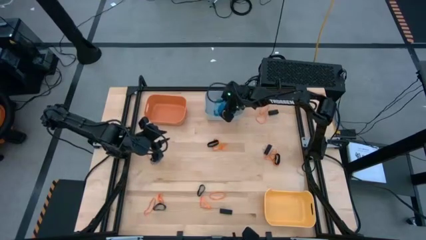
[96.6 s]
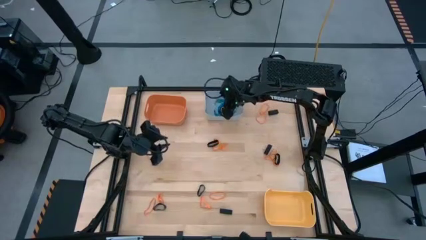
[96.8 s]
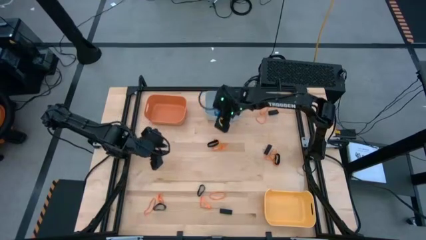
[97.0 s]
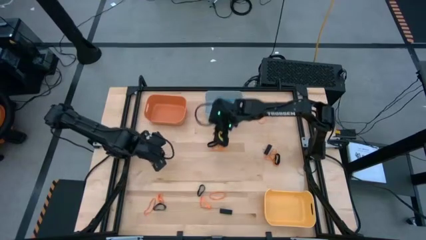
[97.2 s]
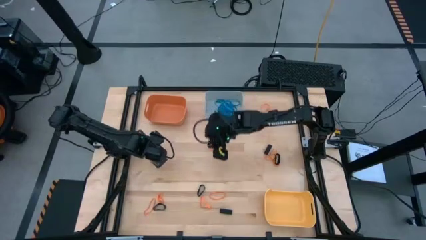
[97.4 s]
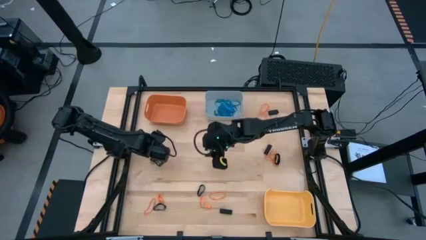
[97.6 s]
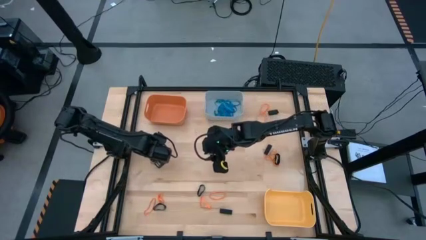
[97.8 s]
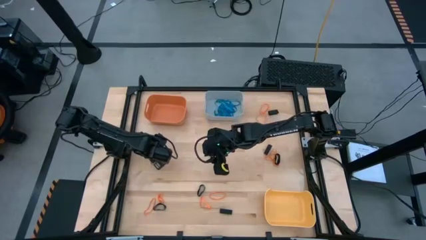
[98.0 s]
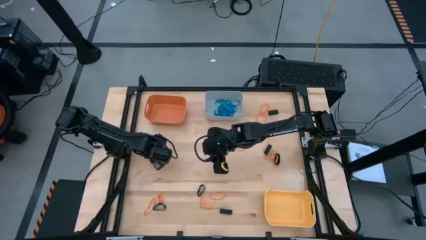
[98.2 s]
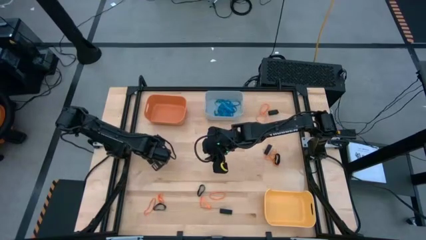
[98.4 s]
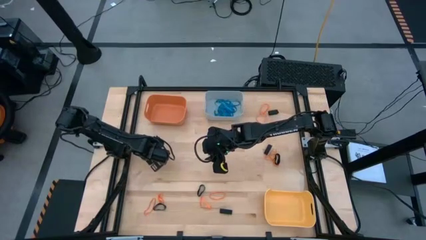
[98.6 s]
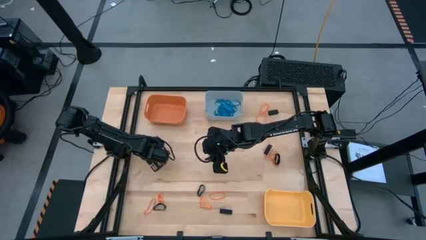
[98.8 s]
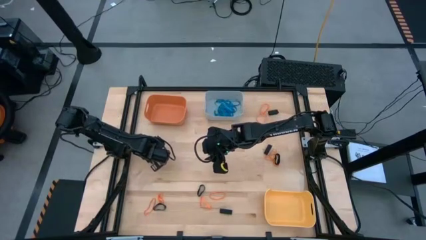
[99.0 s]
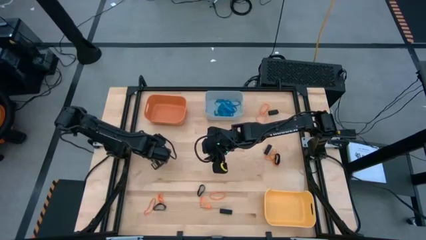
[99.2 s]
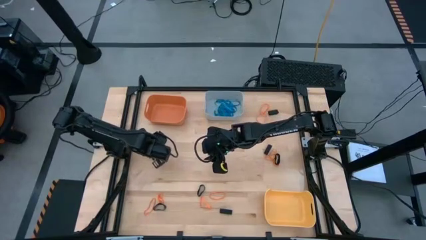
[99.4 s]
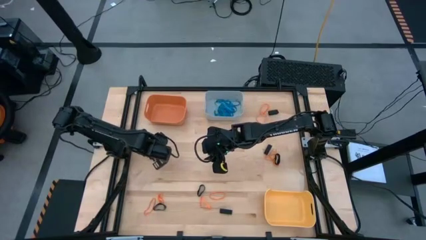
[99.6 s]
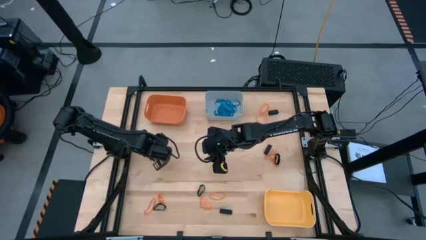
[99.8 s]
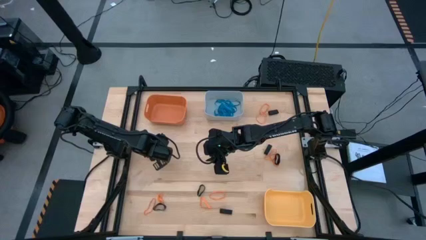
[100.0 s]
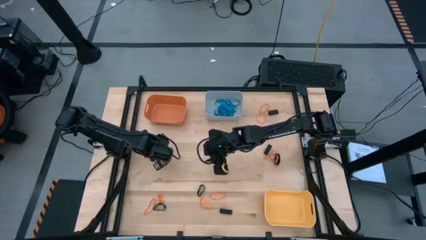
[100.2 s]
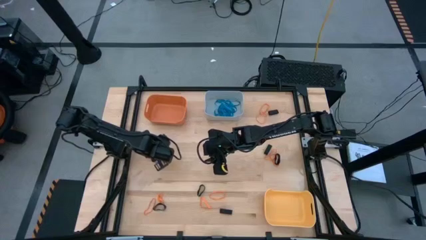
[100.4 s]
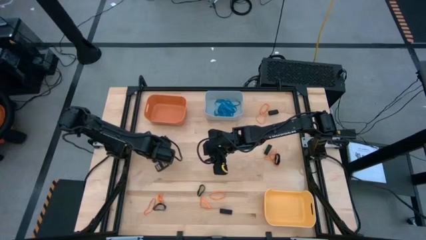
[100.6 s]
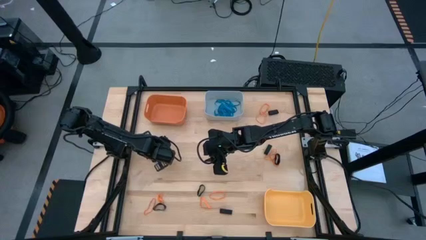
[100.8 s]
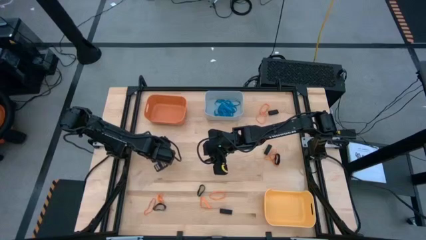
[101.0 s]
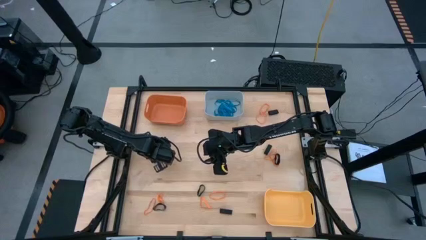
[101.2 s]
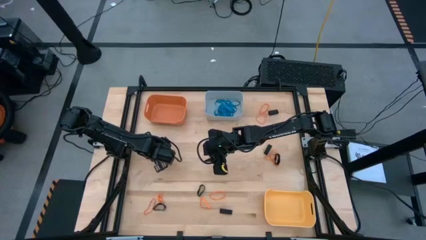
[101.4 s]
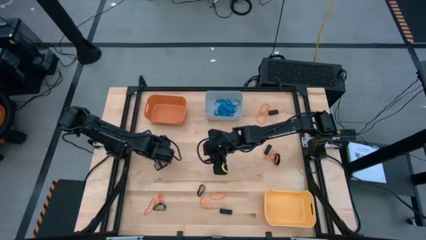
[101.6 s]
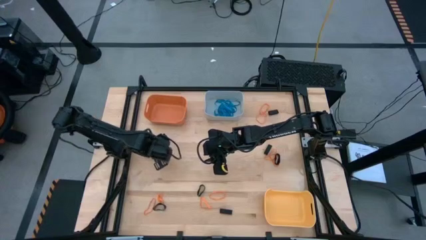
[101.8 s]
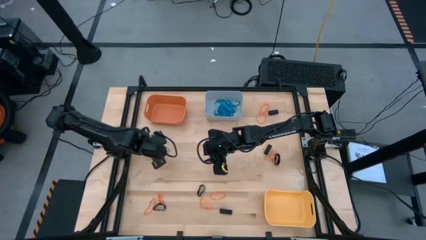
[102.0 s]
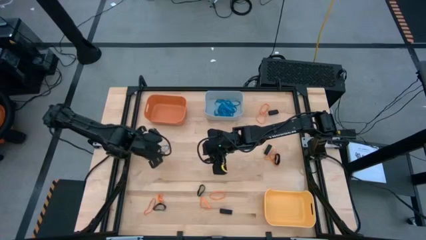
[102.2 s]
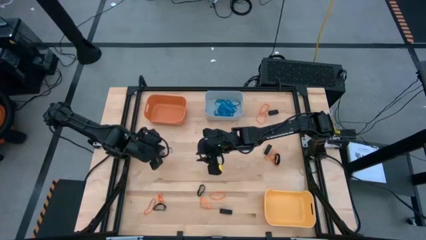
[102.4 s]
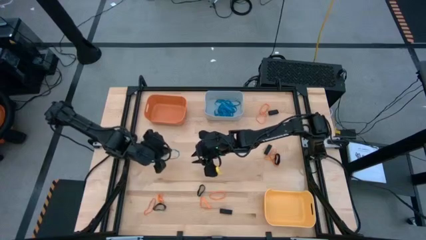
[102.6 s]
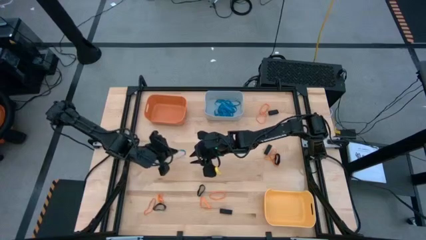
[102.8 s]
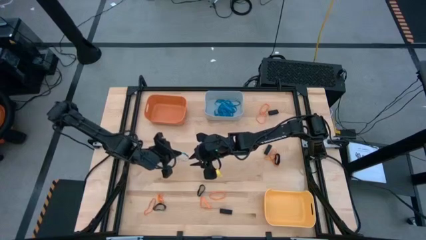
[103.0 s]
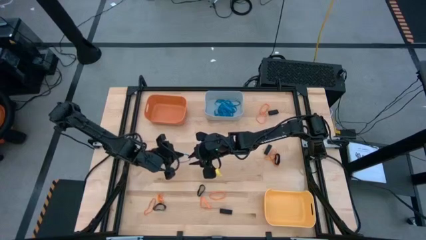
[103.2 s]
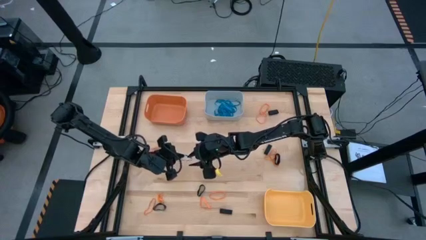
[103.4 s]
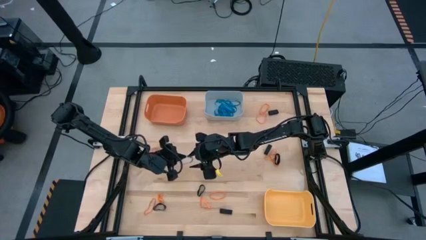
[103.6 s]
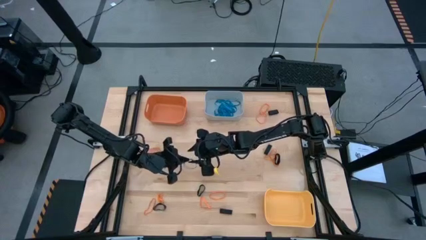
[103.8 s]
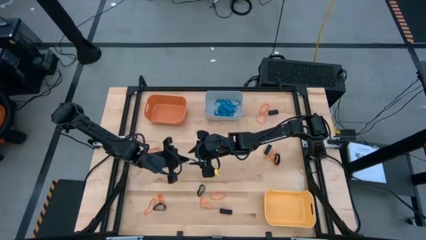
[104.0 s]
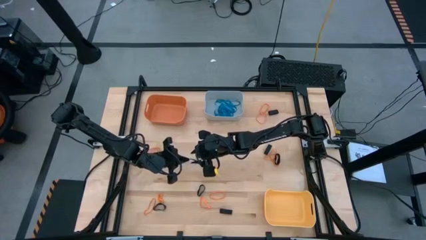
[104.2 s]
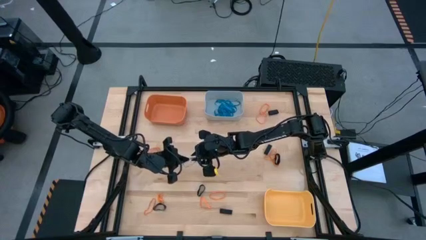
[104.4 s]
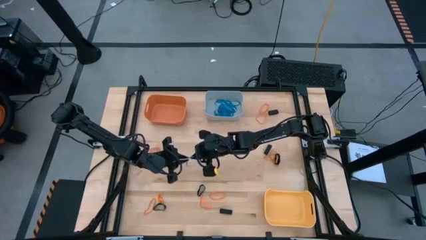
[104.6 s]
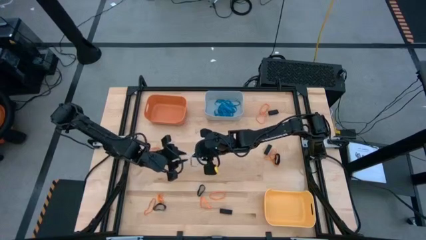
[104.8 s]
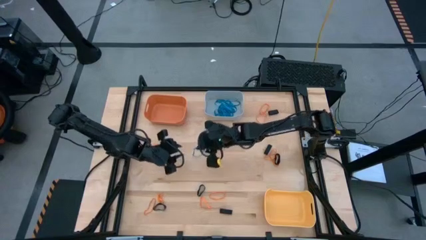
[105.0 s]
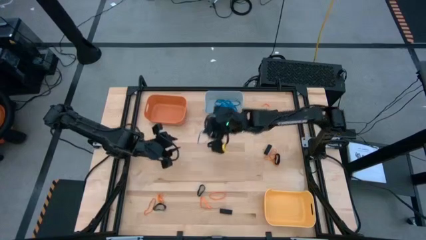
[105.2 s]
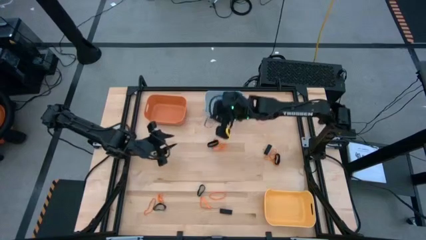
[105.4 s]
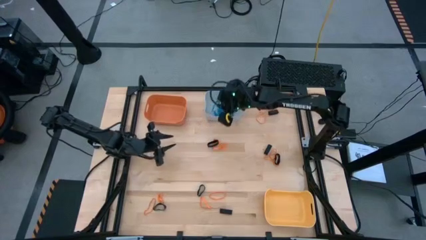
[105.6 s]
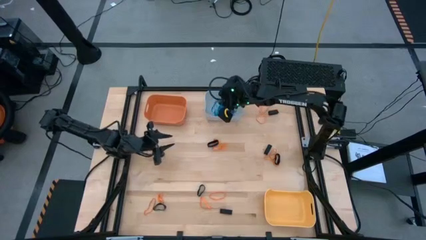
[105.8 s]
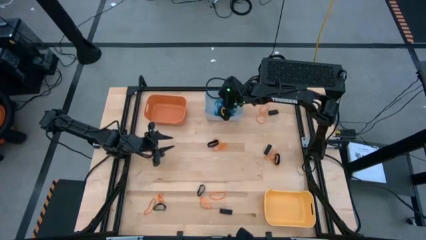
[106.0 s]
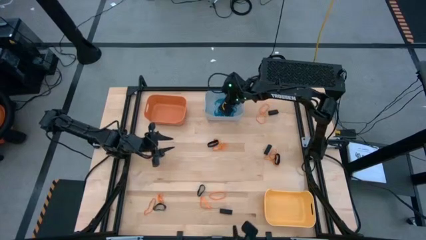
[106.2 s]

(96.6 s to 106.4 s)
Task: Sort rubber bands into baskets
Put the blue rubberband into the gray bin

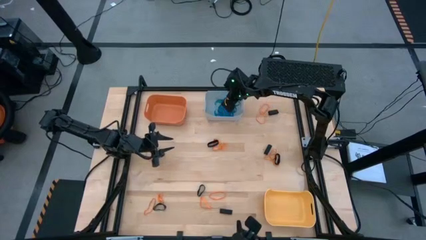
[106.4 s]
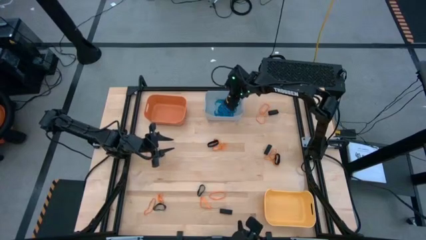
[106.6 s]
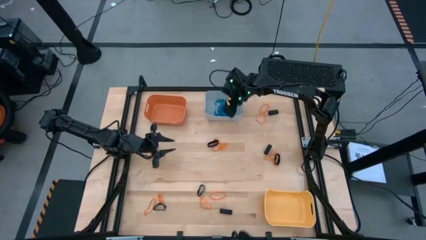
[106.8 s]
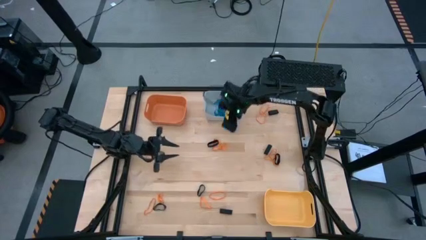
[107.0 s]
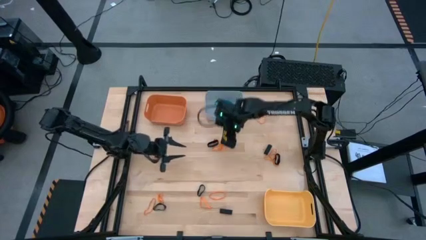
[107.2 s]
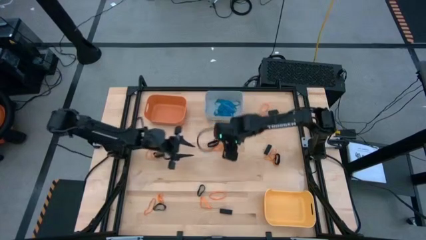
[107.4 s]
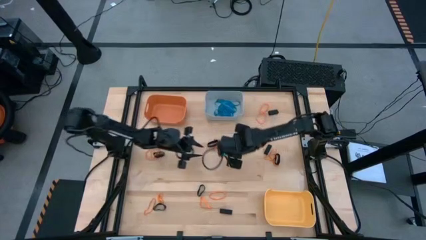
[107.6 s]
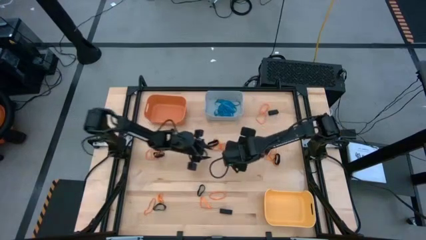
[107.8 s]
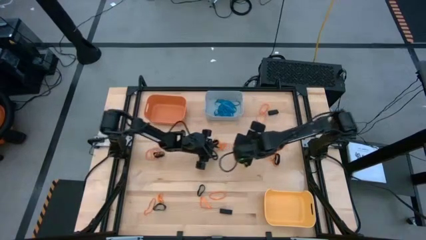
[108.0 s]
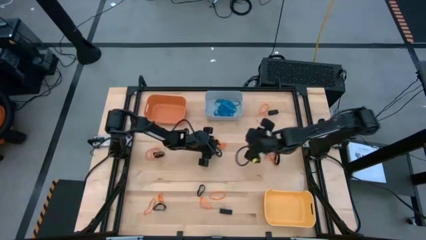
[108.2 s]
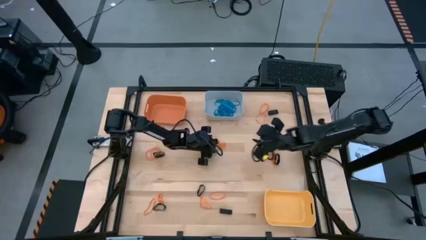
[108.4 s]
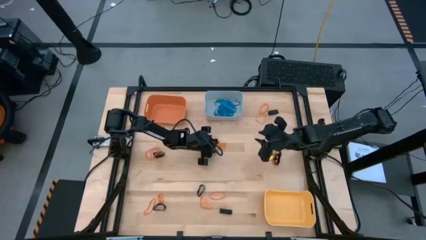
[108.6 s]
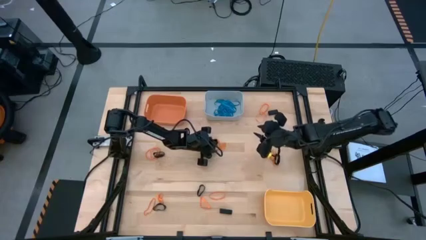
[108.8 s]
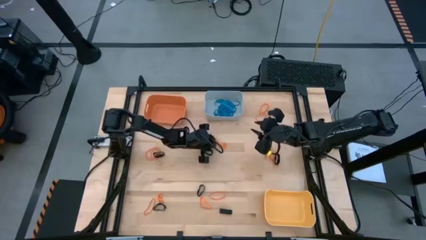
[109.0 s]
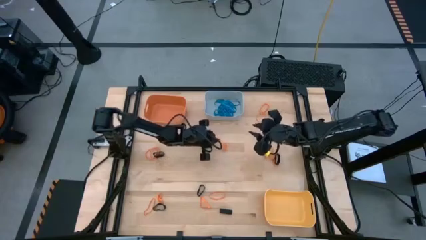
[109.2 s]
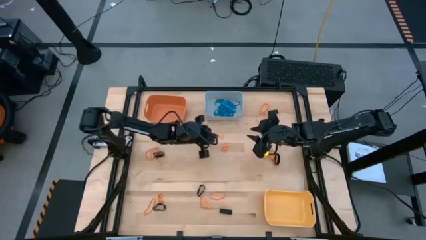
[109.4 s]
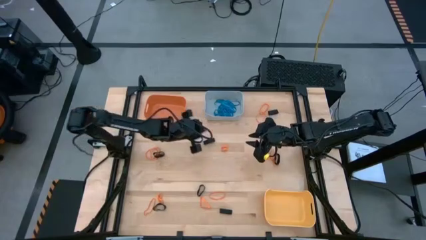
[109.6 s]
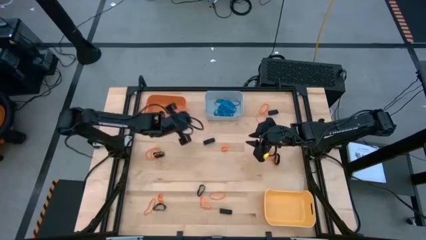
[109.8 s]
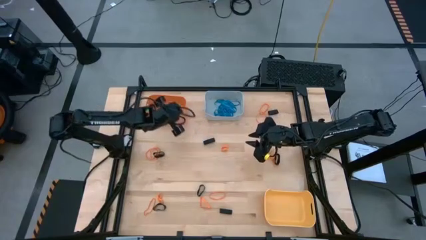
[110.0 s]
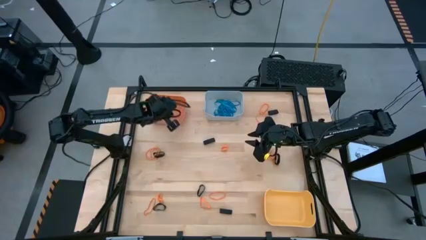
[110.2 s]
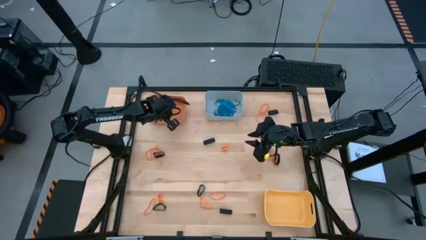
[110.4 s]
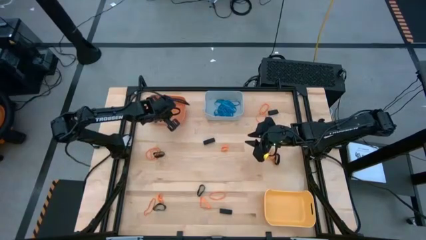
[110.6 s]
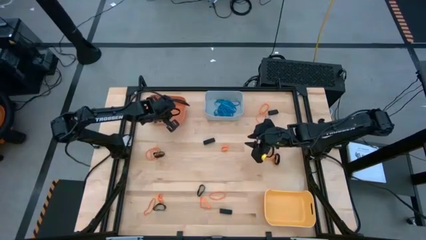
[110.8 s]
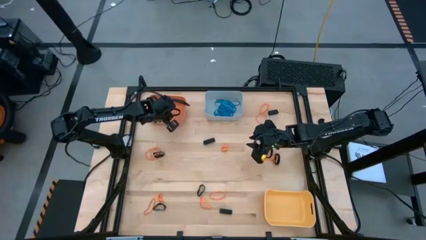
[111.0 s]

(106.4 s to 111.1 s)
Put the orange rubberband into the orange bin
